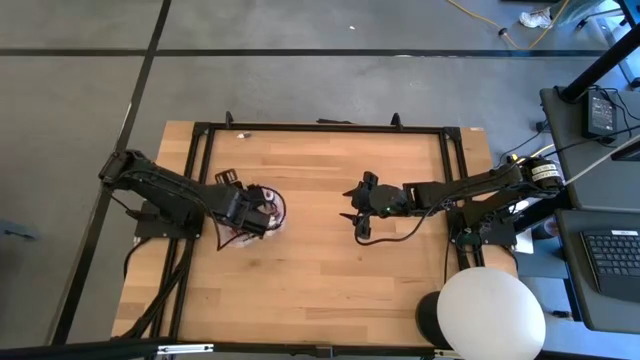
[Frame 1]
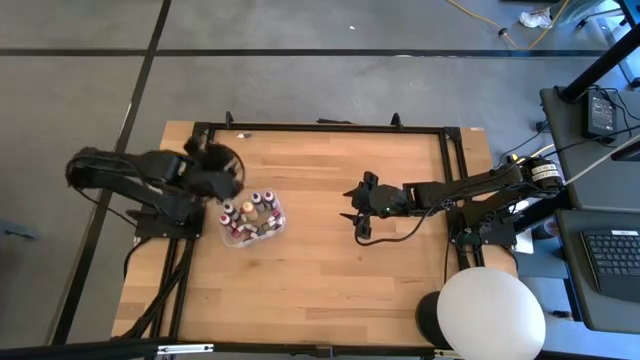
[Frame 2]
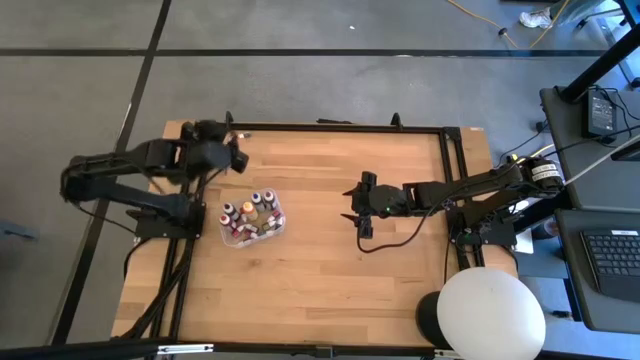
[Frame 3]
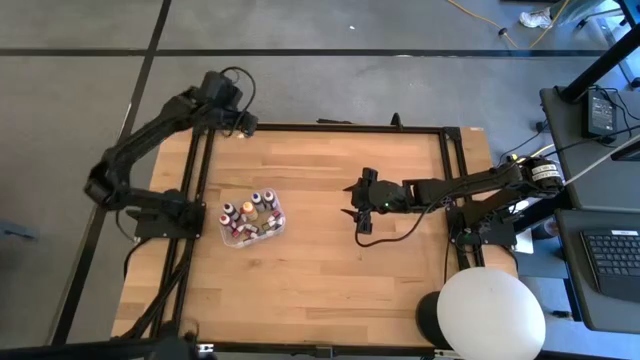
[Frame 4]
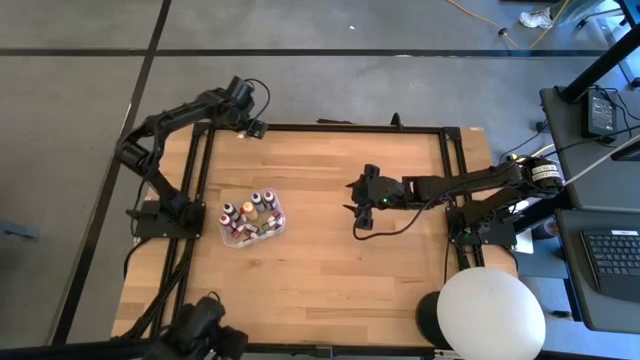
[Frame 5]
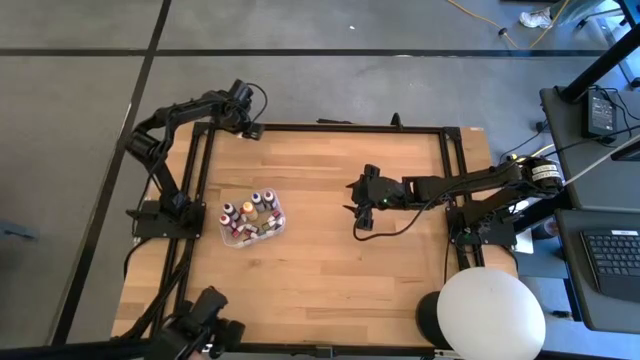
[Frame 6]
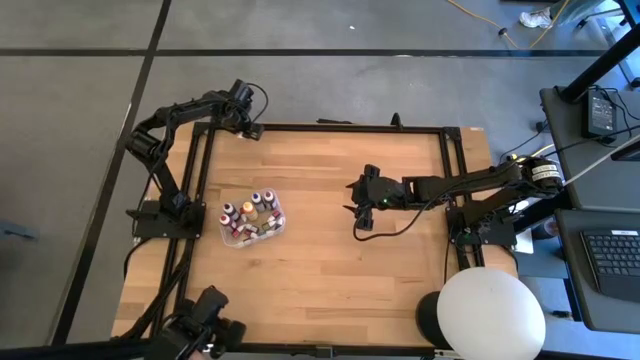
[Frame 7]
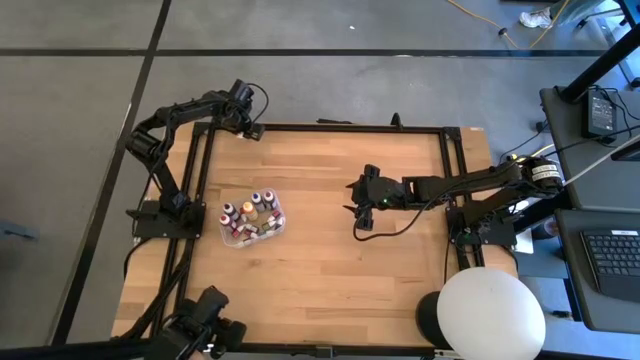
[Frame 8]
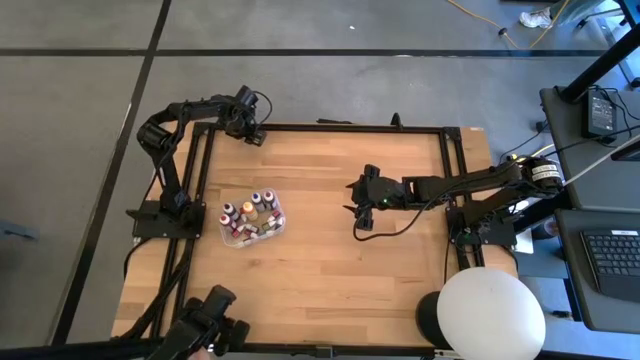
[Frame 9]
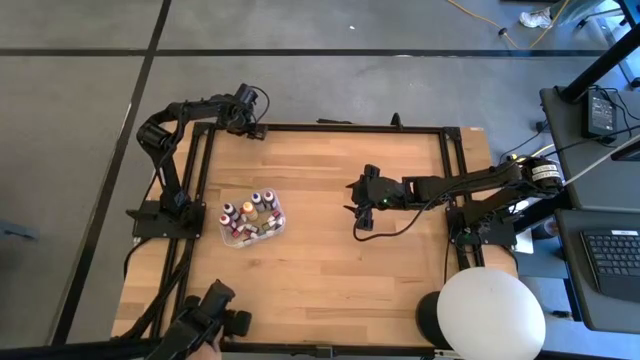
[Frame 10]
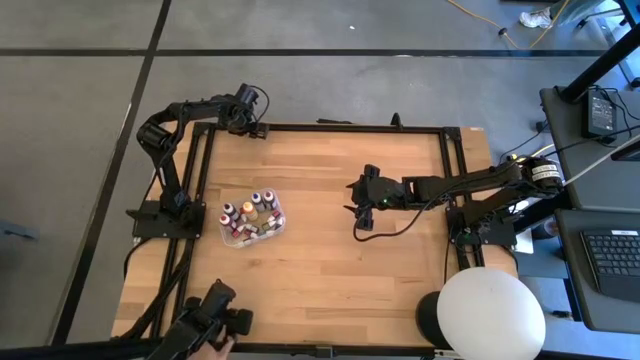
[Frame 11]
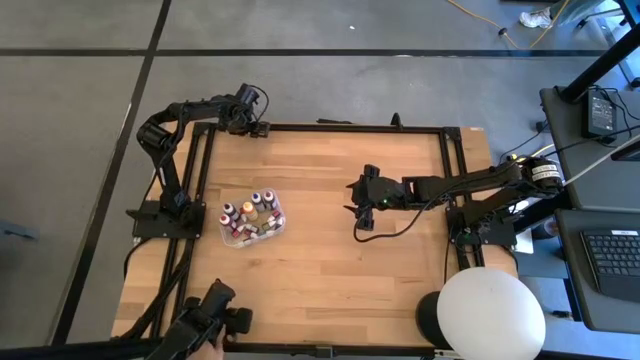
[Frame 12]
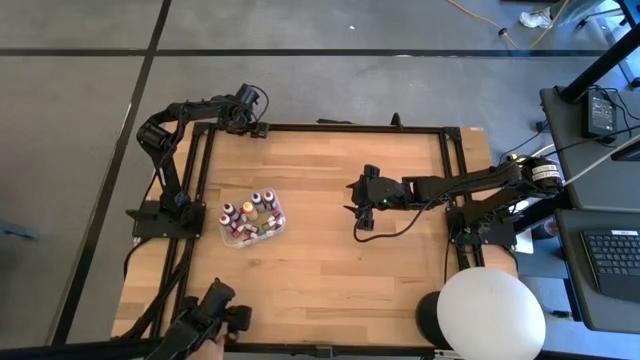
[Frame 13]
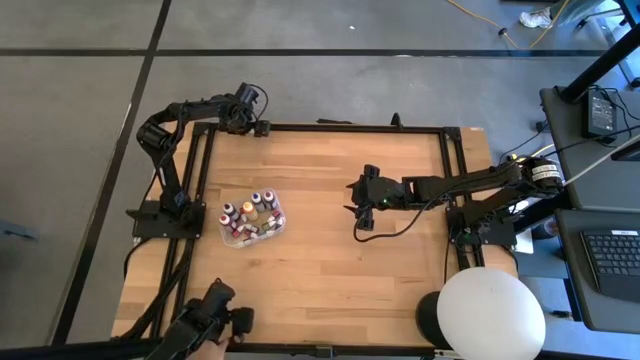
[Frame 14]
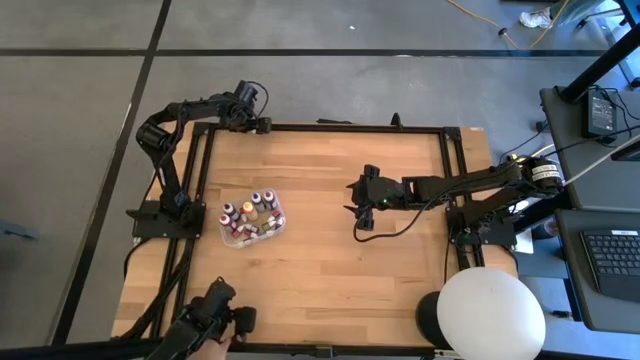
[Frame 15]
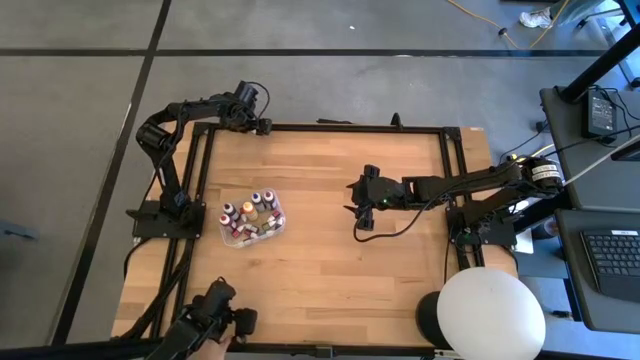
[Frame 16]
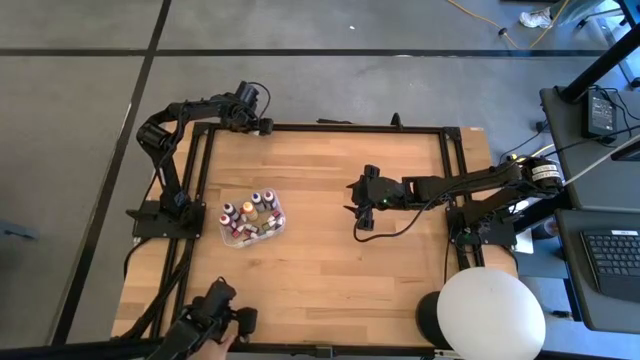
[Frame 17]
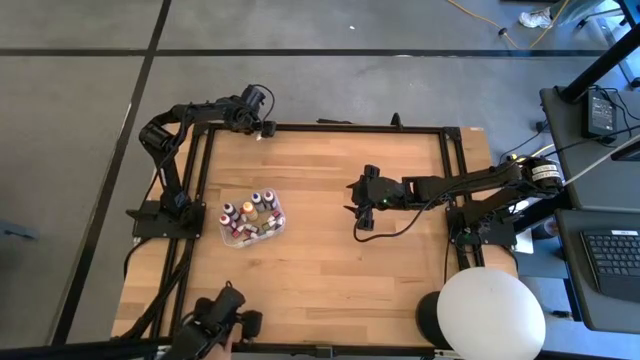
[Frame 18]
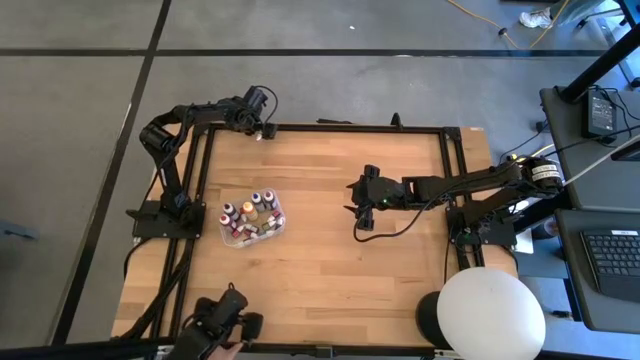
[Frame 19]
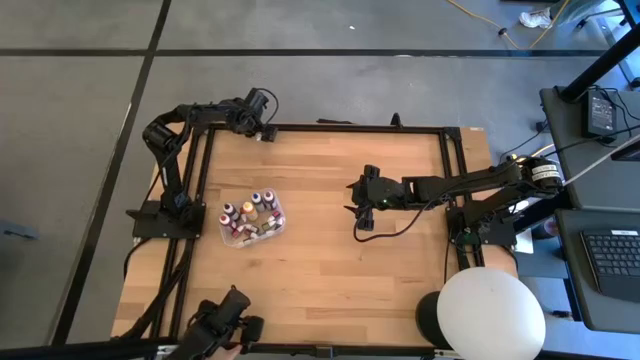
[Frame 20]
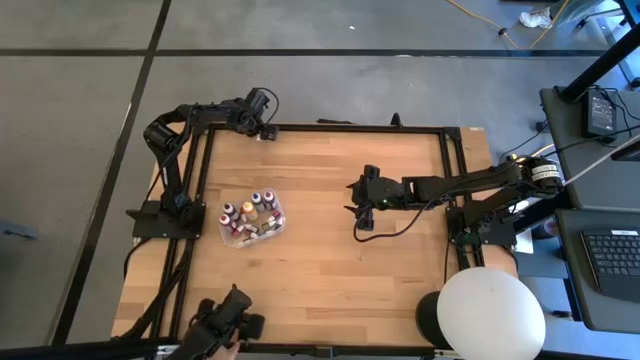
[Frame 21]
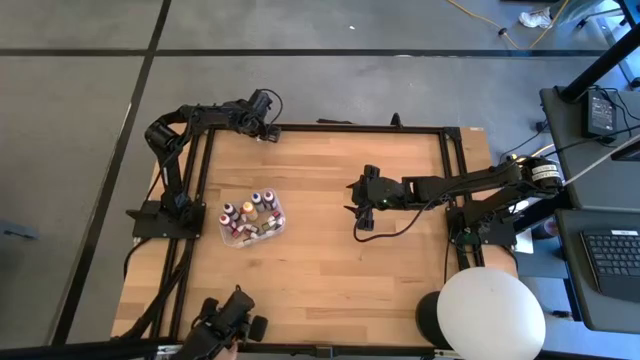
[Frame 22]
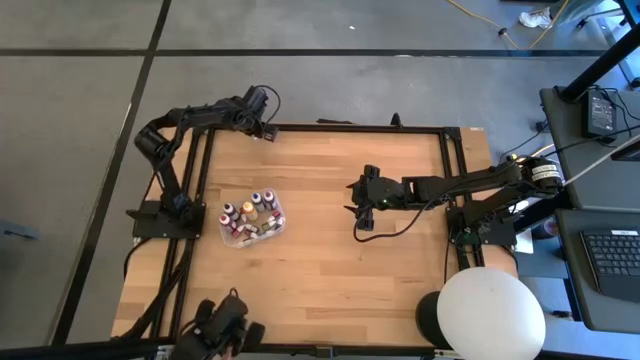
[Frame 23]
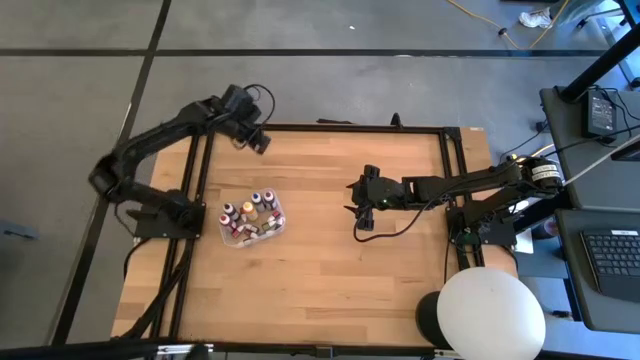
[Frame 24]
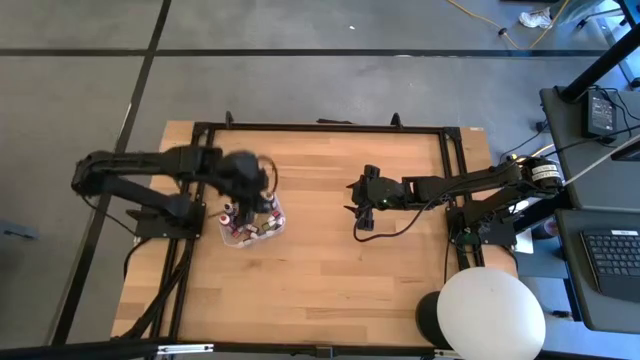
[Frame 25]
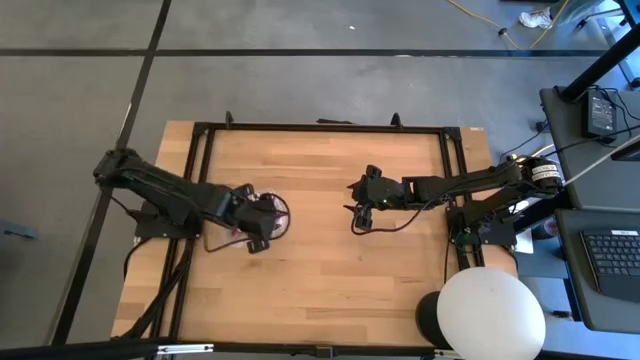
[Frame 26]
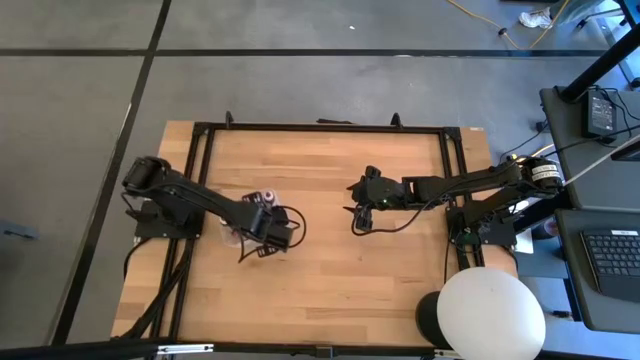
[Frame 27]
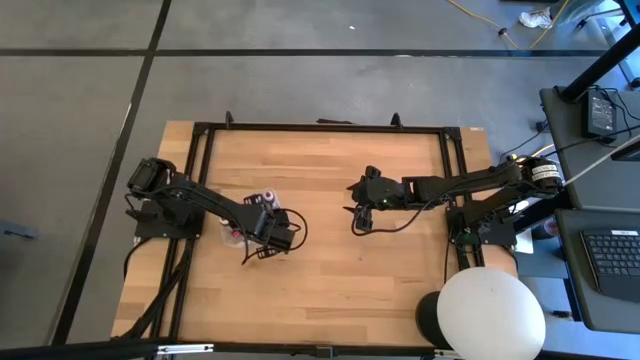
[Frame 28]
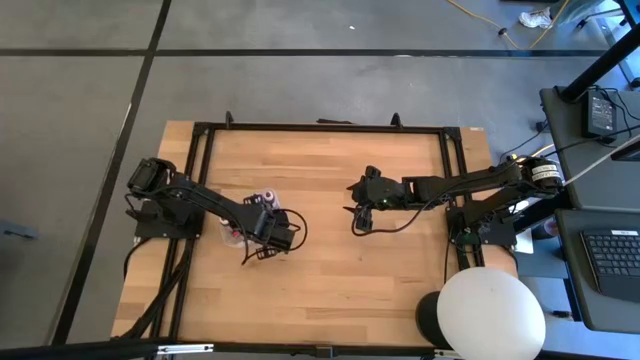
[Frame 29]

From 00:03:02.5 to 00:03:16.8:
Task: Pick & Place food coloring
Put the small dark green food coloring bottle into the transparent bin

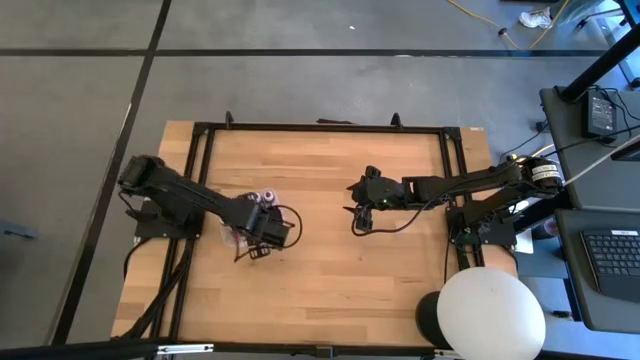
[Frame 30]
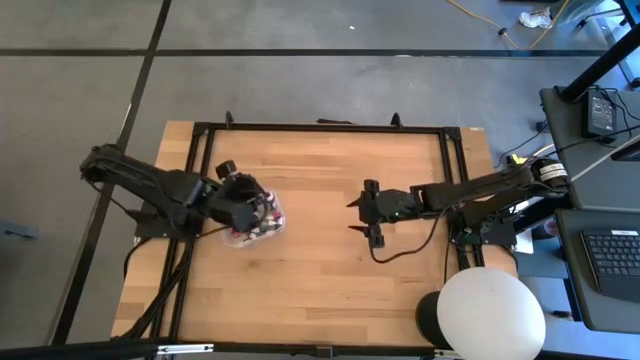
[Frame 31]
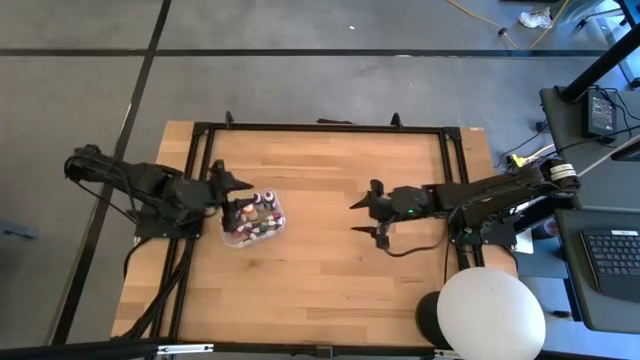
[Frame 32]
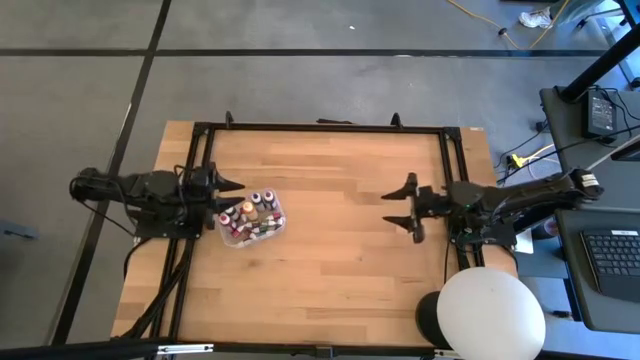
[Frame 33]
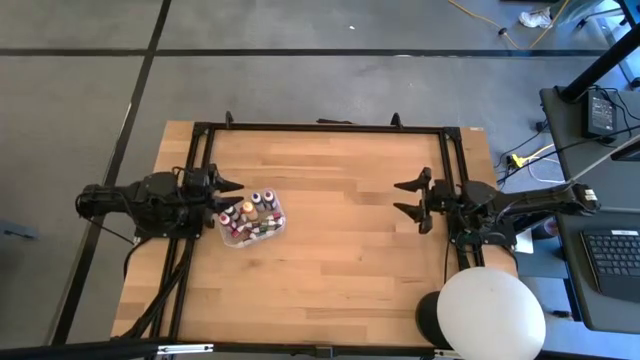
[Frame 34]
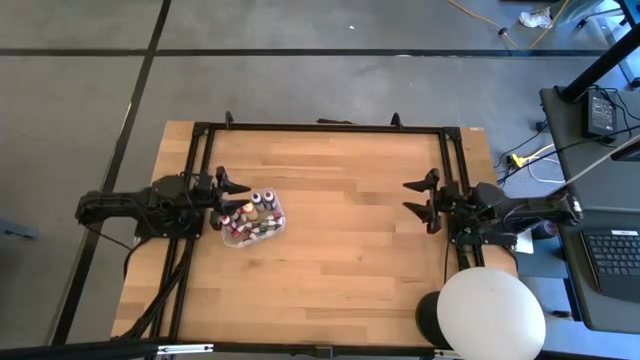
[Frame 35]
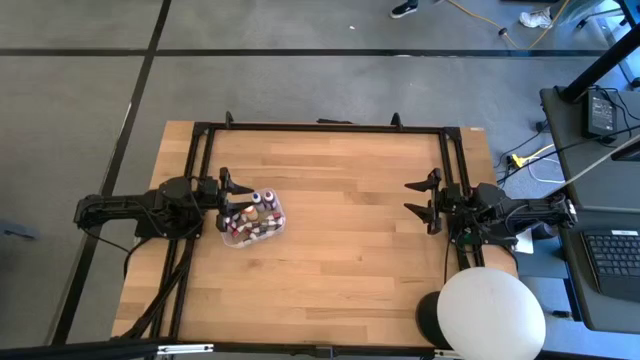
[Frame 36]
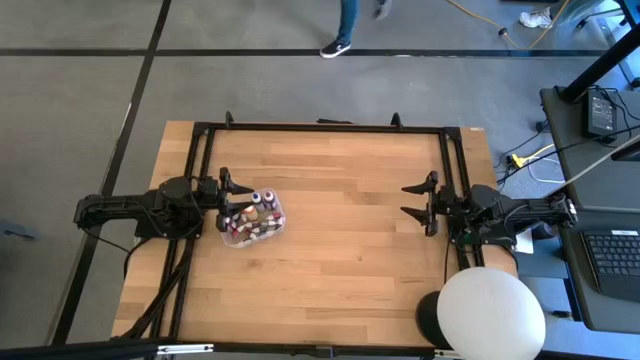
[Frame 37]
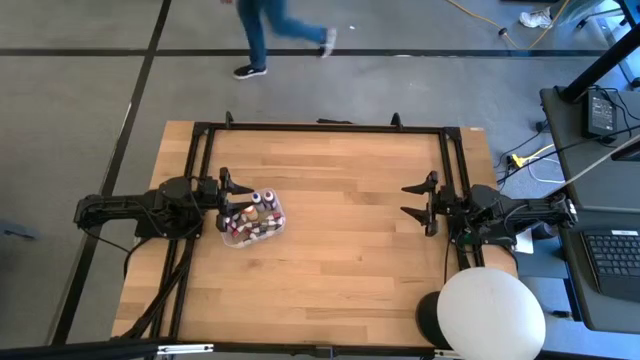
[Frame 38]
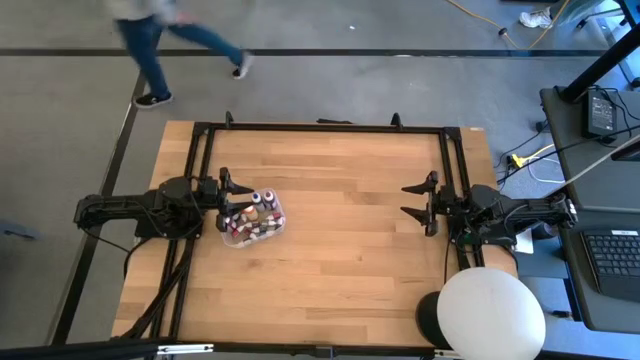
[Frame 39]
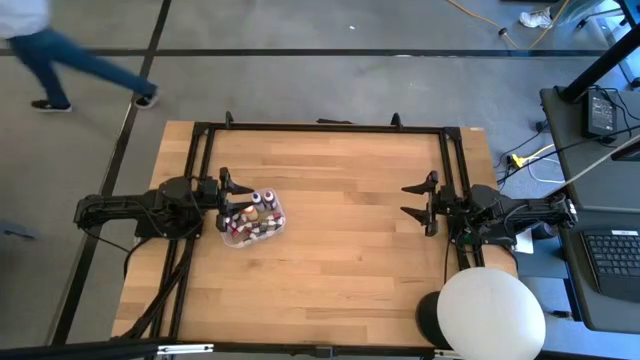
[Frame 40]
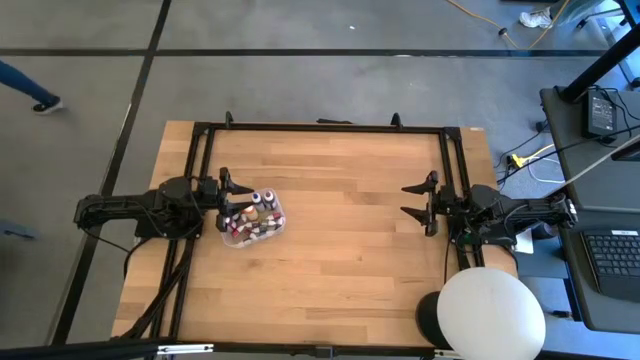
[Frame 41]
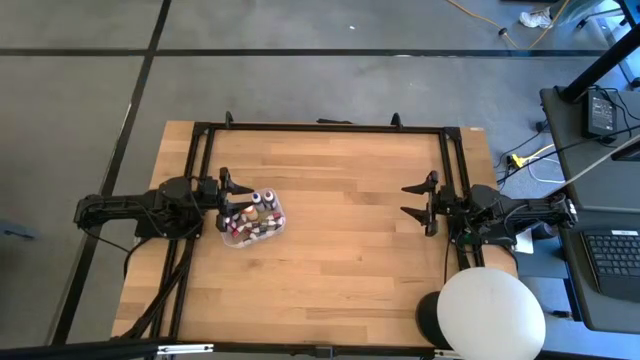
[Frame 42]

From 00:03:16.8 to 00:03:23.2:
Return to Home Position
